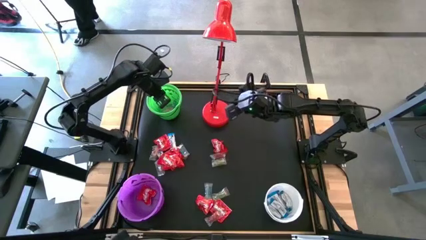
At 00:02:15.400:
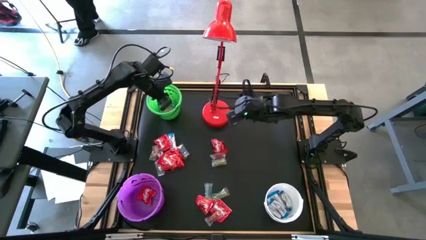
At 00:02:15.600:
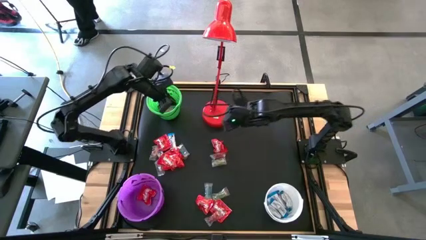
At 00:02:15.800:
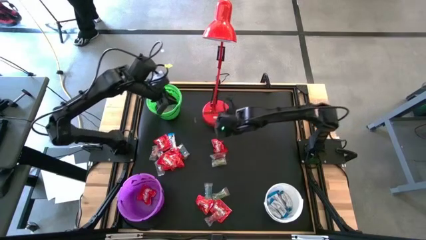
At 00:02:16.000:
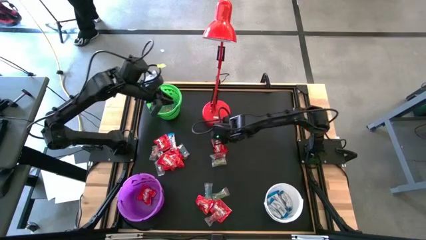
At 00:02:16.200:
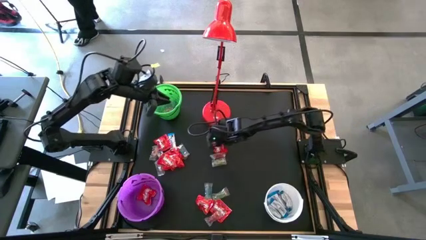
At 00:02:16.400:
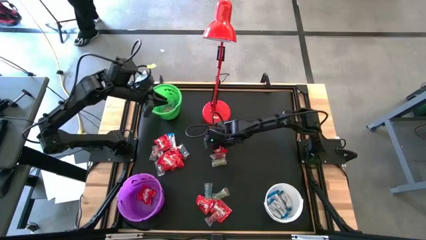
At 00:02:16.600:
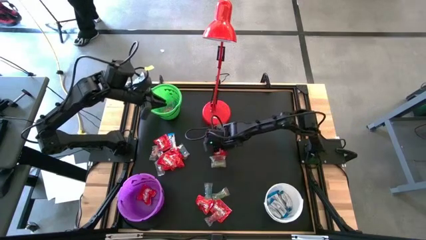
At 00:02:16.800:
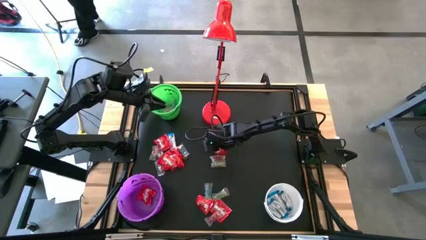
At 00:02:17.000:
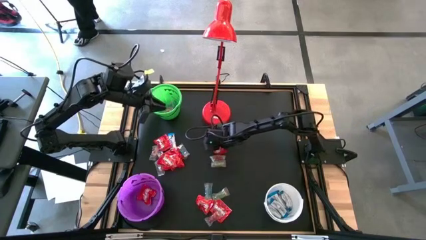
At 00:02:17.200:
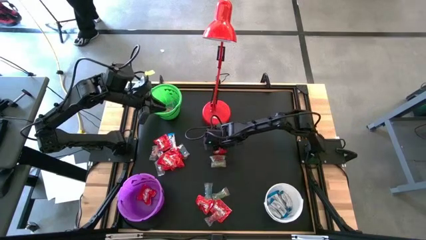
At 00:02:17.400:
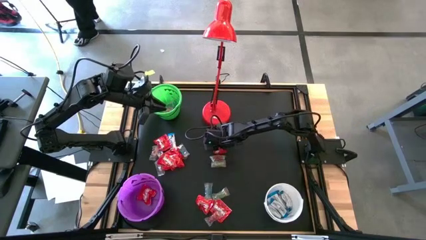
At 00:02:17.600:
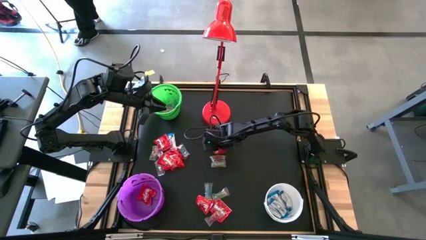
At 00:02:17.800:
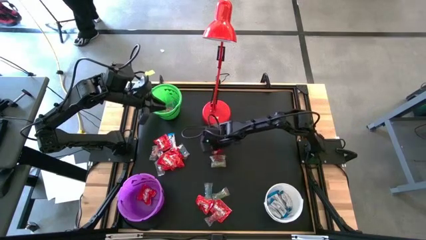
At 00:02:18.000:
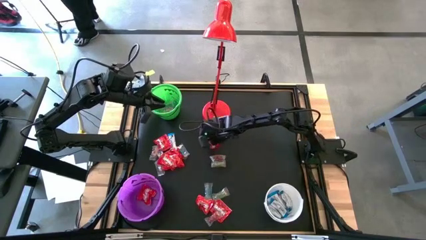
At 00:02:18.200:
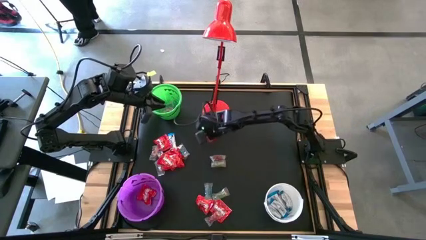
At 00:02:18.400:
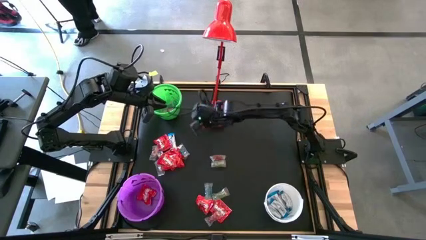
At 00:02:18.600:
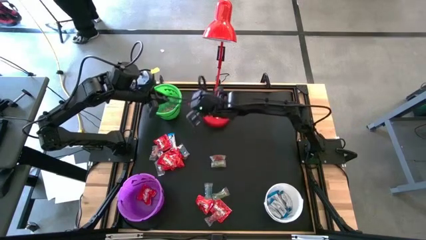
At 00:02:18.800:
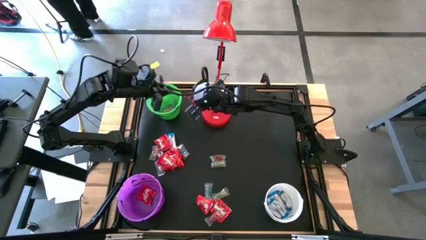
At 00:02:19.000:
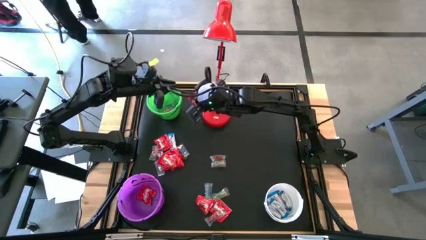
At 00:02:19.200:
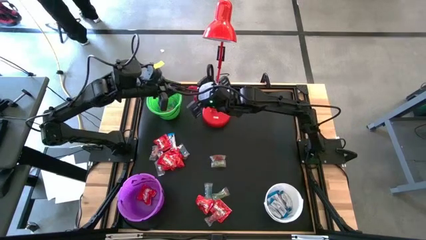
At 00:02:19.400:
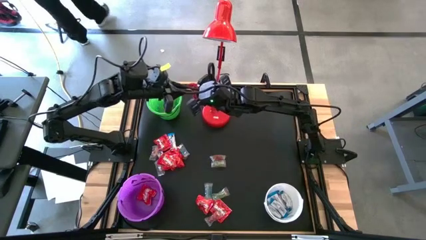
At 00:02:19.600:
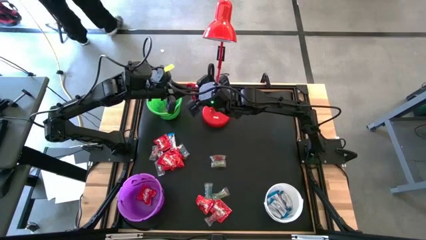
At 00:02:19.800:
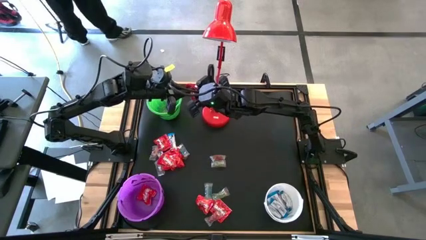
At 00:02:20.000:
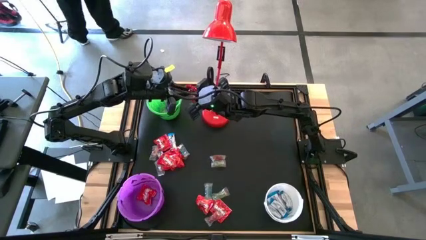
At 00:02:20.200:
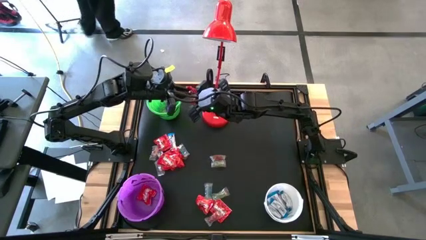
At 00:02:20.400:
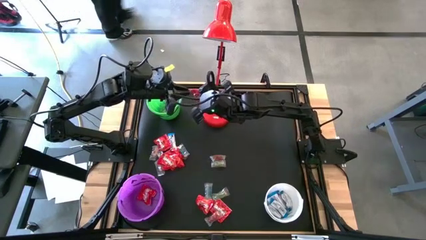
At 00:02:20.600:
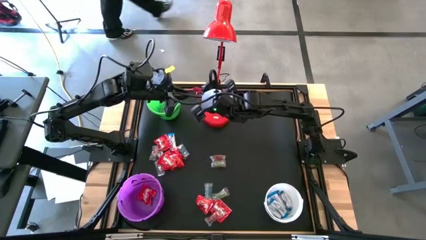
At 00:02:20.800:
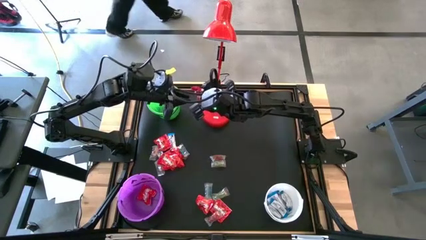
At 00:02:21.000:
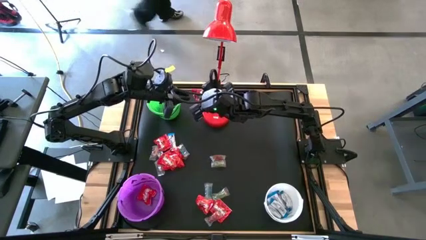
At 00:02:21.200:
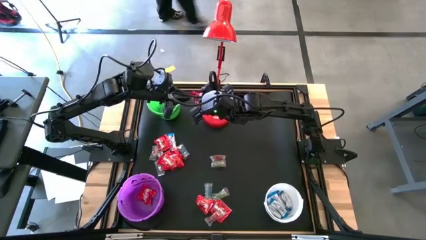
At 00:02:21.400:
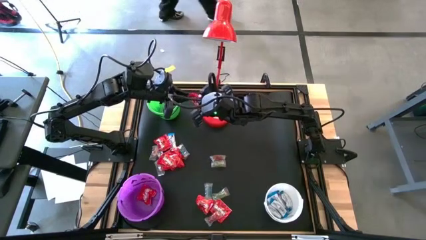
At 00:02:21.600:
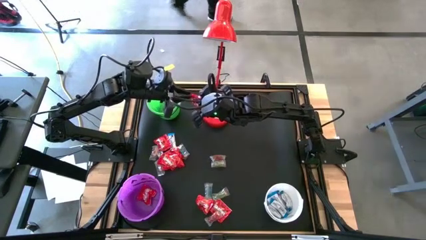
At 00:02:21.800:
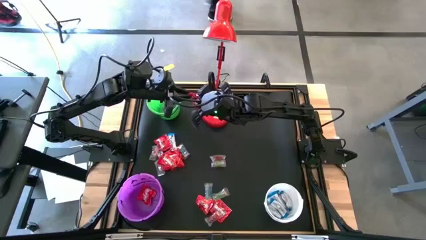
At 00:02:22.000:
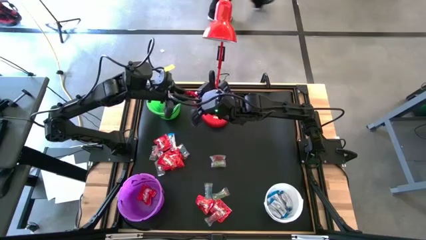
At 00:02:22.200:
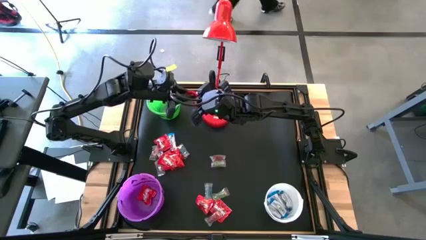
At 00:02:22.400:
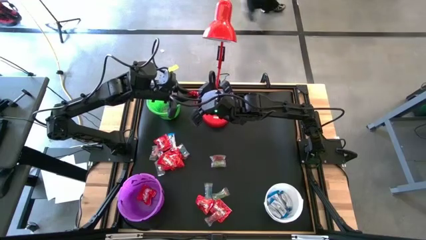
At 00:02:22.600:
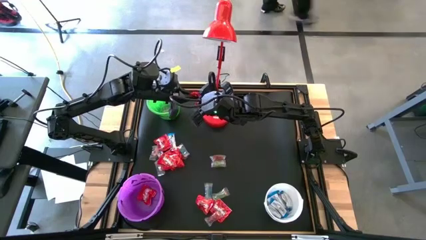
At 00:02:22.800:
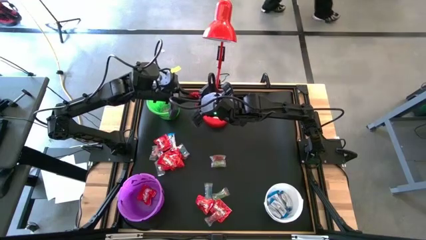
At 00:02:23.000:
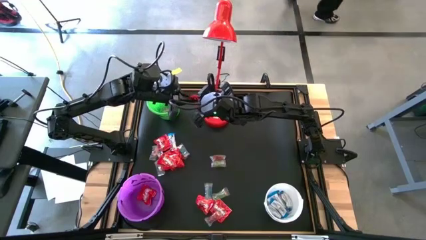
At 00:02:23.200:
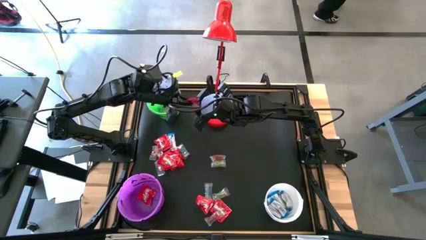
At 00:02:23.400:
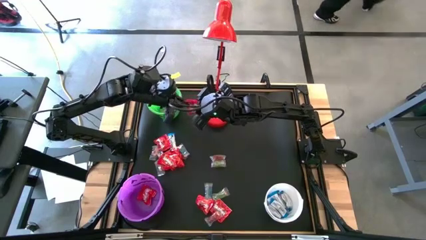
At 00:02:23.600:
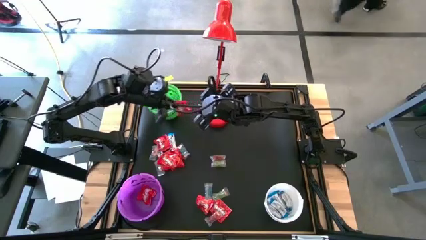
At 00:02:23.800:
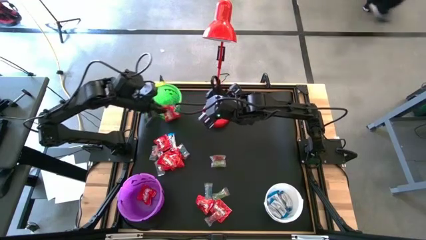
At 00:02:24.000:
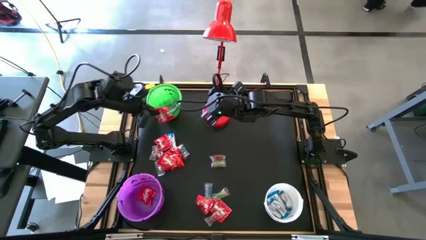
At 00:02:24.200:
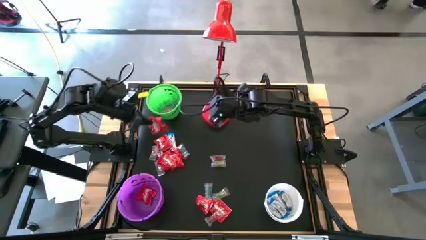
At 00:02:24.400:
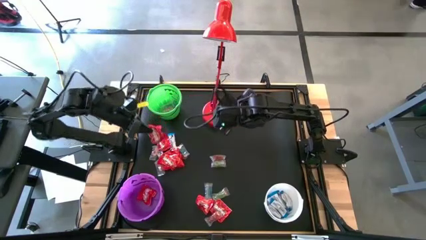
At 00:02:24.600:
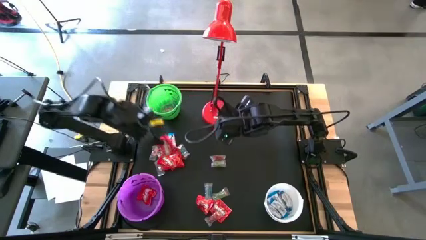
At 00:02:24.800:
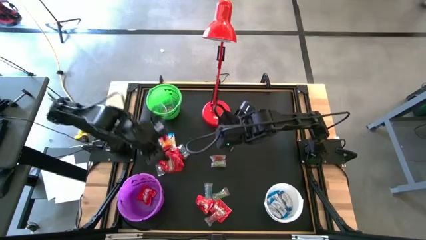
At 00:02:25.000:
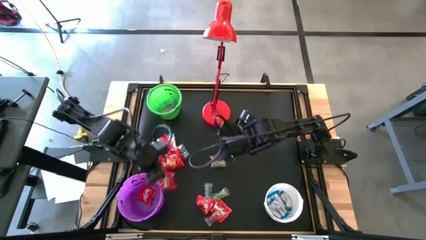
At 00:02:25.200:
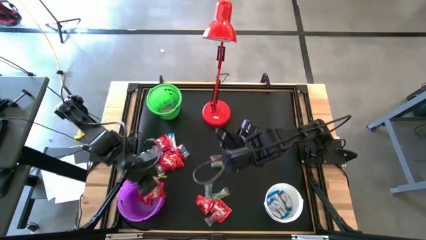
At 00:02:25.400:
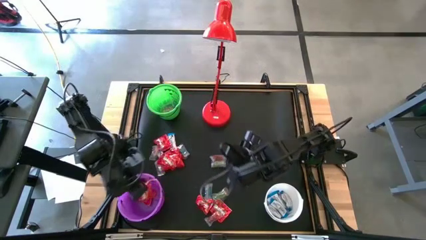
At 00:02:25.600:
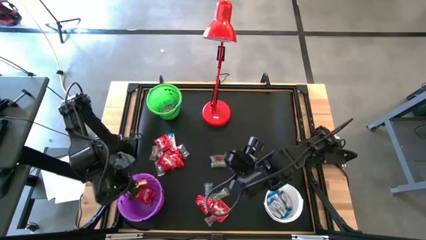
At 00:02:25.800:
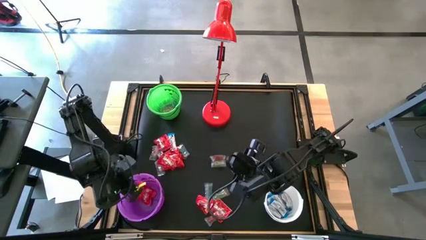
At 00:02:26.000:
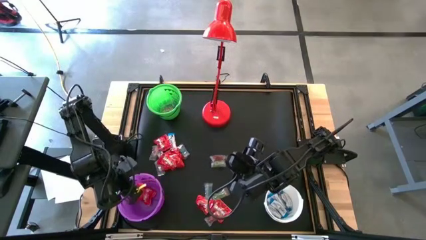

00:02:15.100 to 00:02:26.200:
Task: Sort candy
Put the red candy into the purple bucket

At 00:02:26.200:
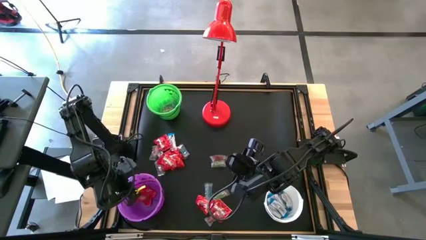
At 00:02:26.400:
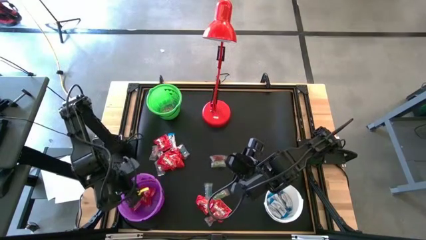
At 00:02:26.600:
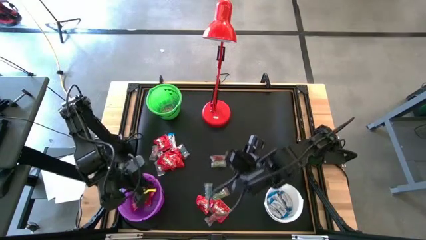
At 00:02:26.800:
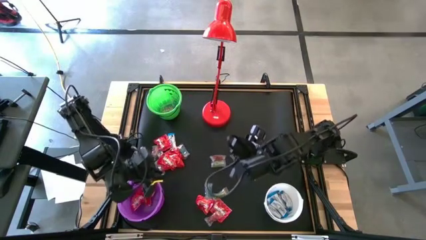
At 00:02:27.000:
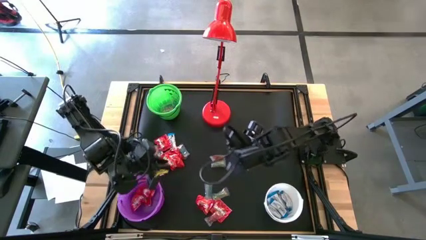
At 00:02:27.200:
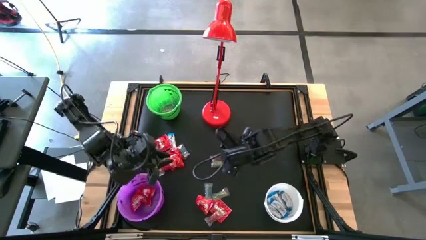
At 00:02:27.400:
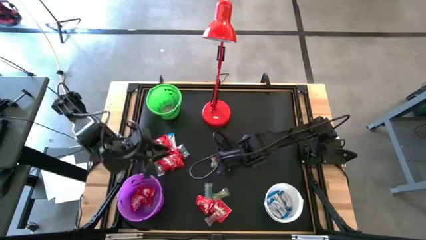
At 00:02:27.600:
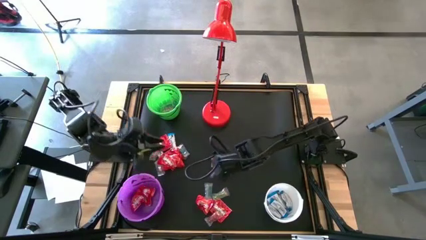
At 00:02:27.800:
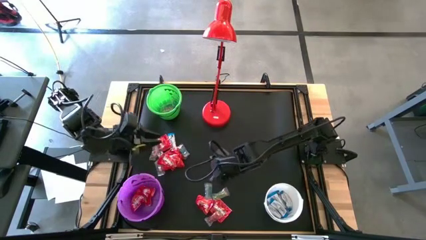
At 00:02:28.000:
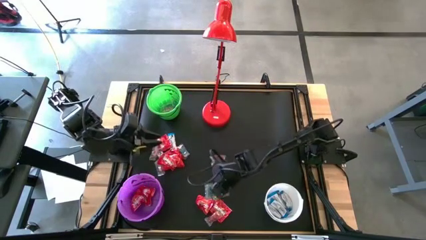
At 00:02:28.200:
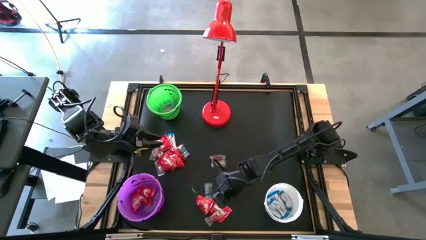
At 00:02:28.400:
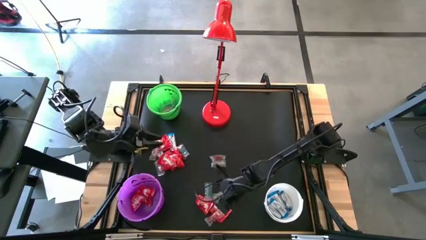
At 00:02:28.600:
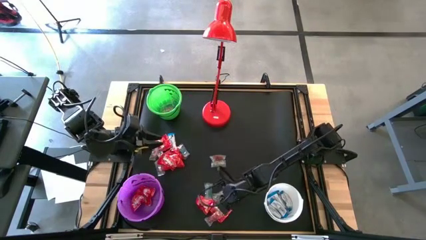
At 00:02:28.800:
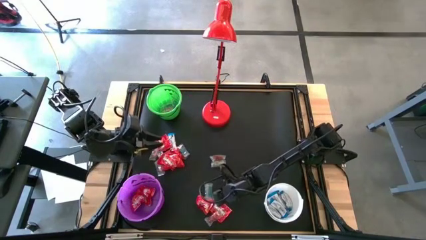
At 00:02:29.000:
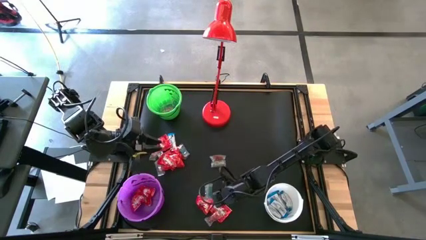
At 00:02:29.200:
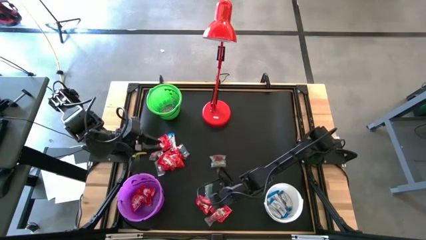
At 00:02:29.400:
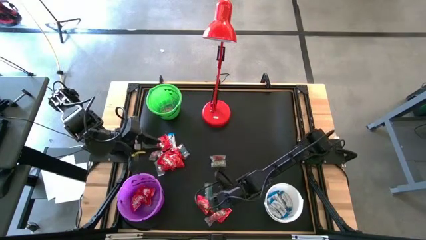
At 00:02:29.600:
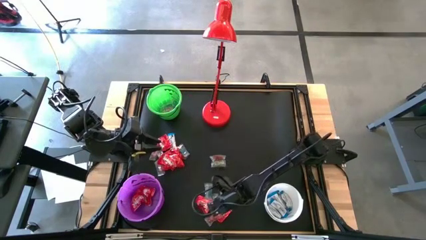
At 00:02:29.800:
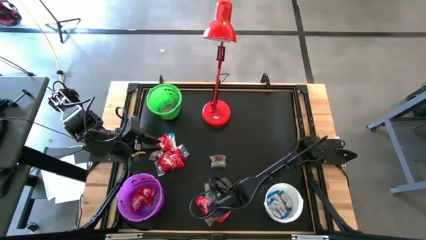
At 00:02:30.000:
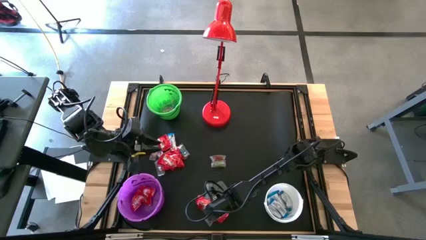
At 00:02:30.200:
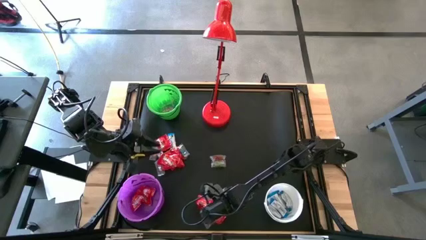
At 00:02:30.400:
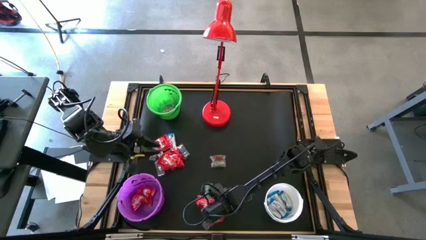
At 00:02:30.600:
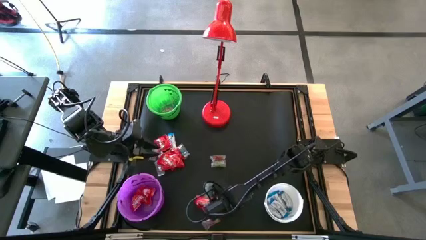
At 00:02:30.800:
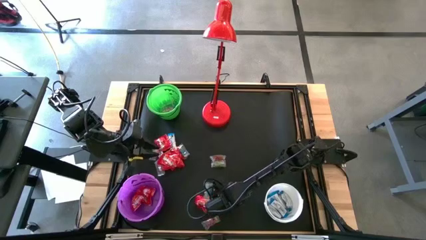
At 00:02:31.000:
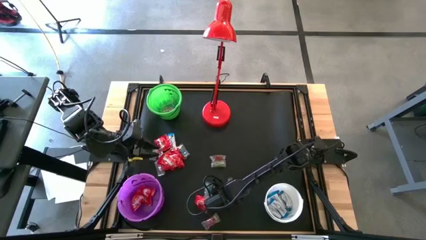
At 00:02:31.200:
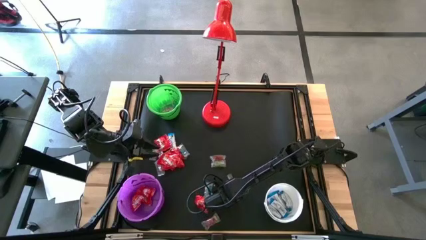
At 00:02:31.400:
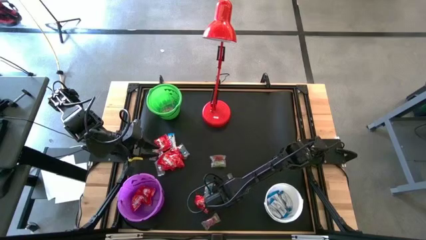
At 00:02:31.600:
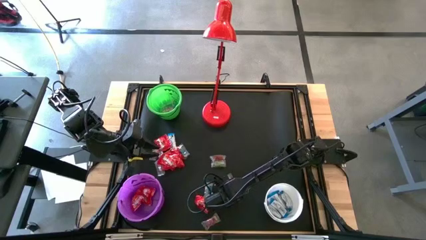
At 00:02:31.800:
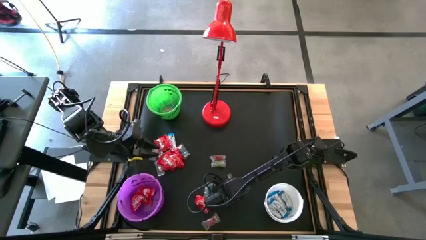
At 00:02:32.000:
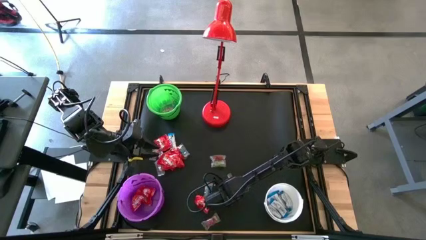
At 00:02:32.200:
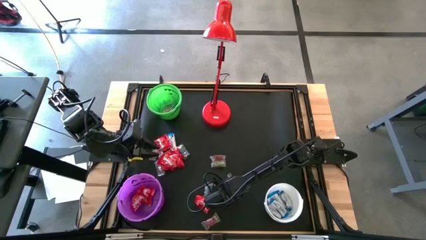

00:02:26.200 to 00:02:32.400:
Put the red candy into the purple bucket
